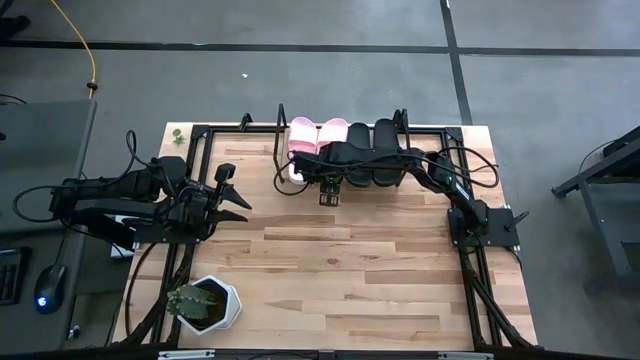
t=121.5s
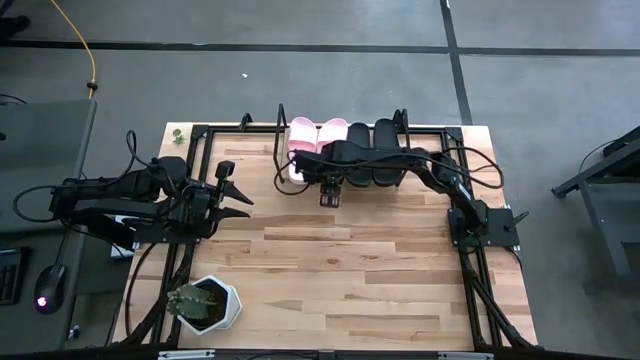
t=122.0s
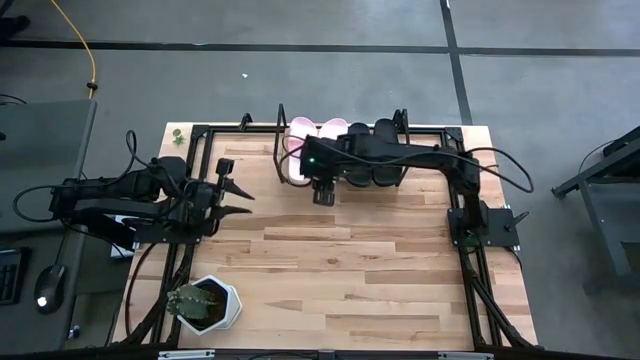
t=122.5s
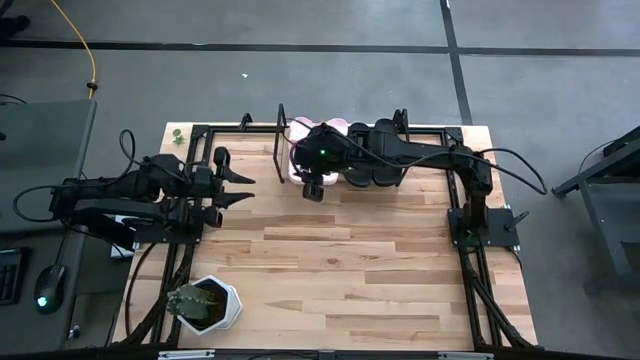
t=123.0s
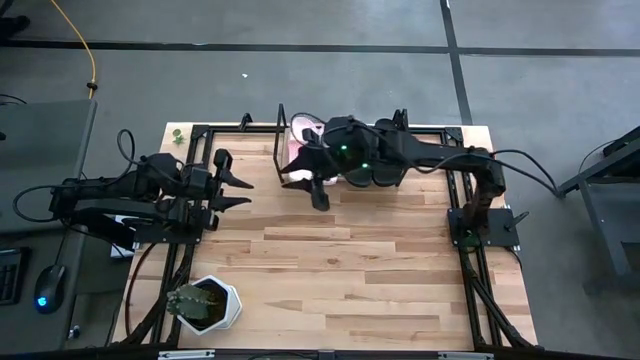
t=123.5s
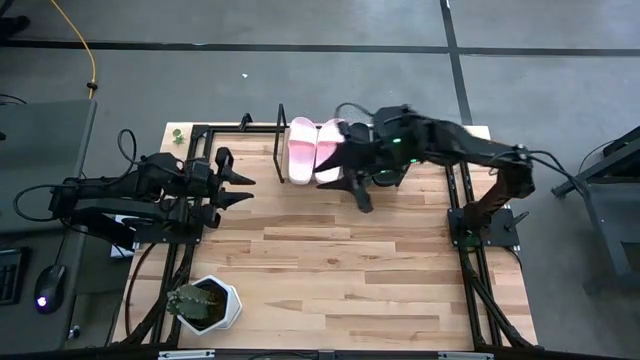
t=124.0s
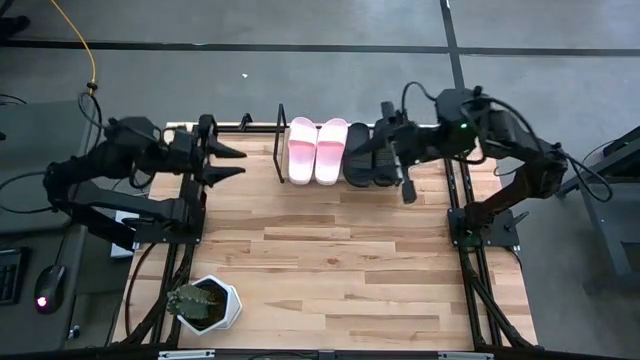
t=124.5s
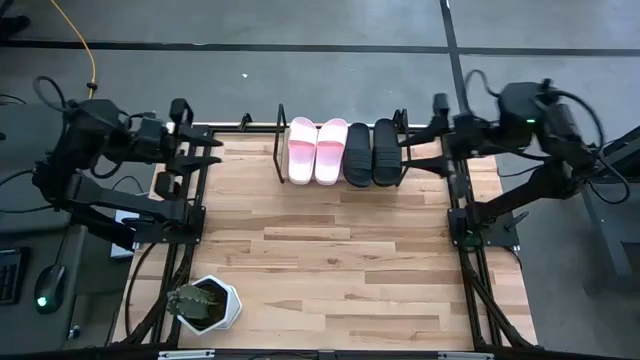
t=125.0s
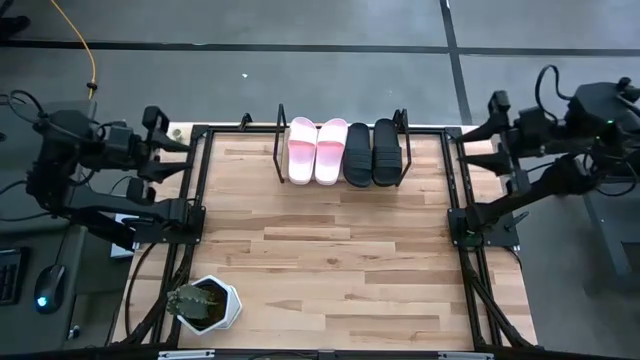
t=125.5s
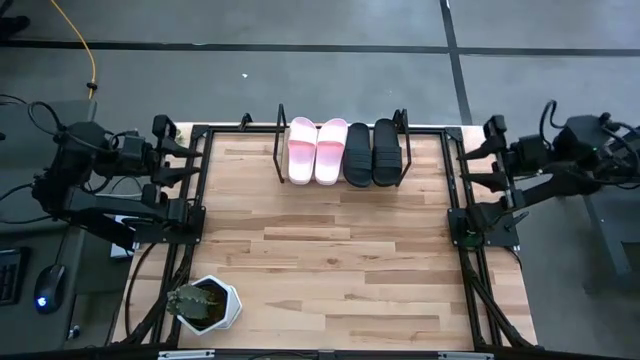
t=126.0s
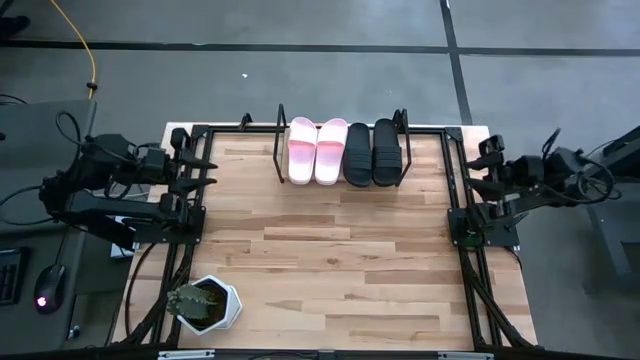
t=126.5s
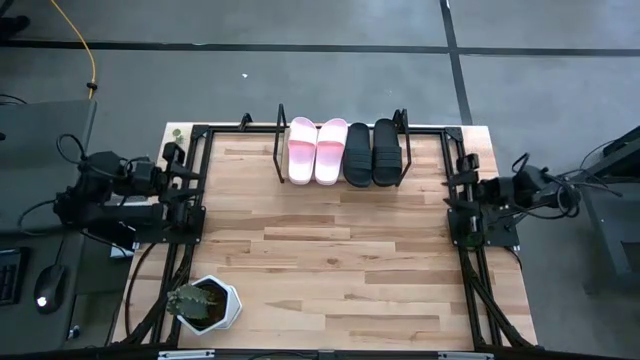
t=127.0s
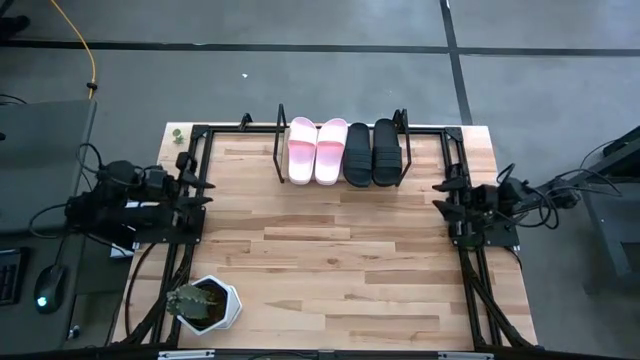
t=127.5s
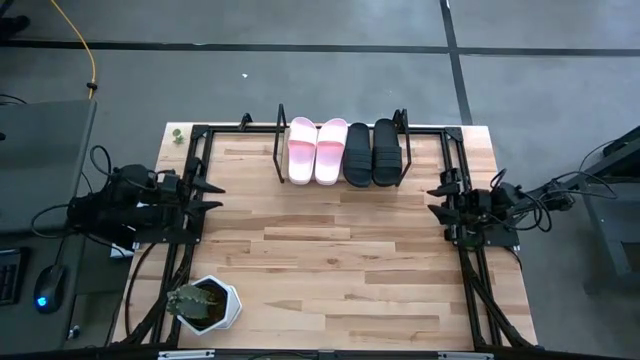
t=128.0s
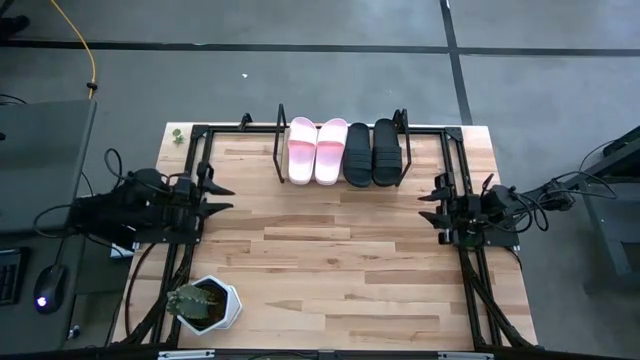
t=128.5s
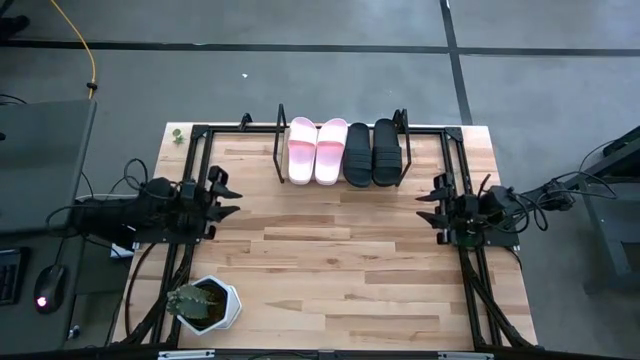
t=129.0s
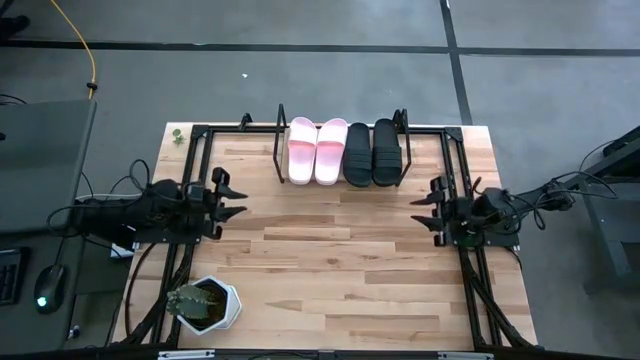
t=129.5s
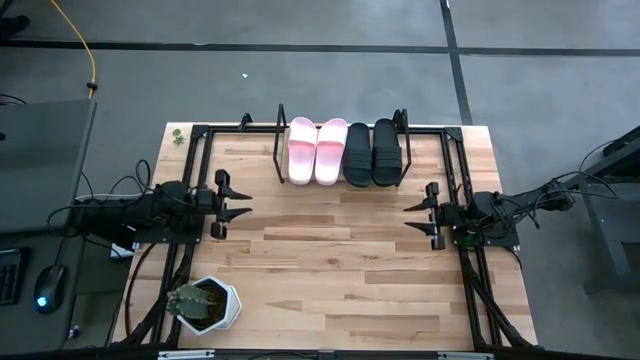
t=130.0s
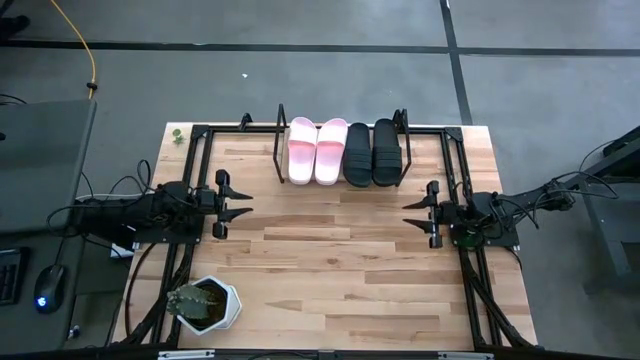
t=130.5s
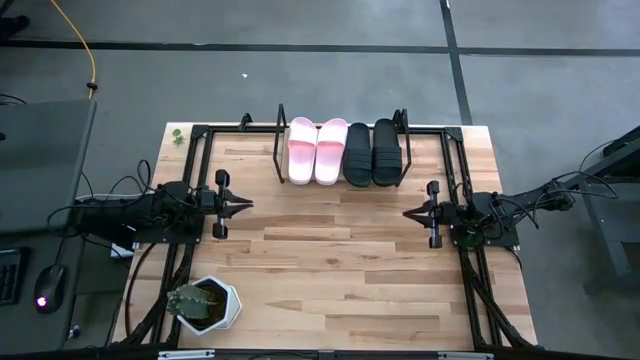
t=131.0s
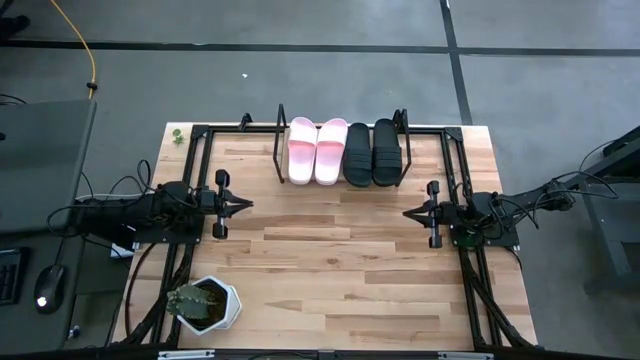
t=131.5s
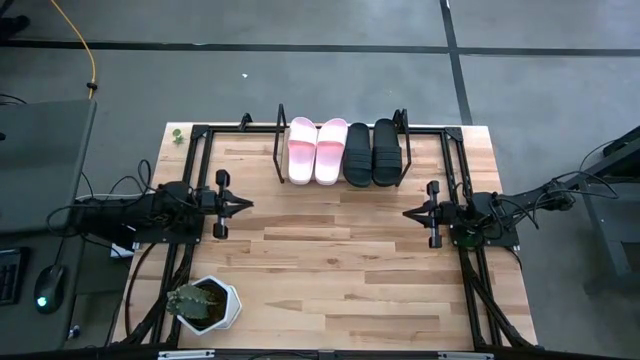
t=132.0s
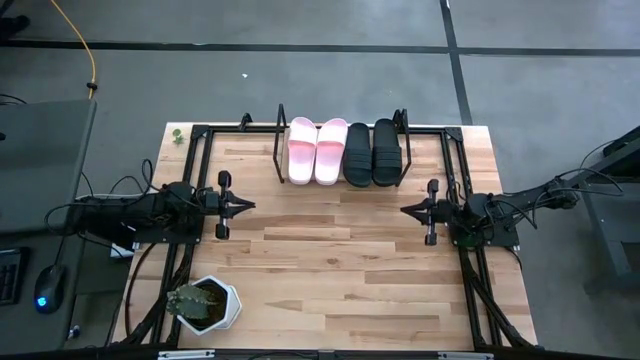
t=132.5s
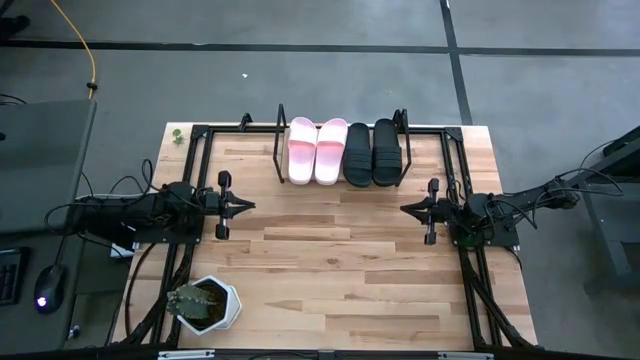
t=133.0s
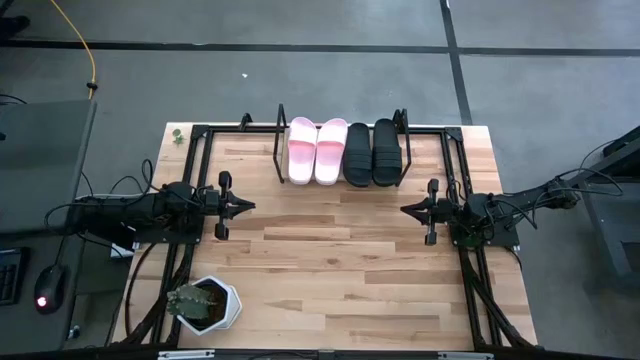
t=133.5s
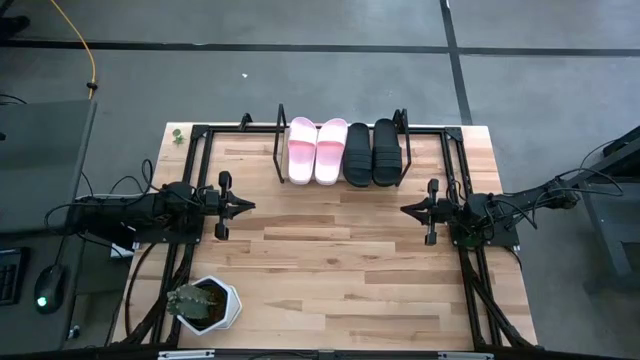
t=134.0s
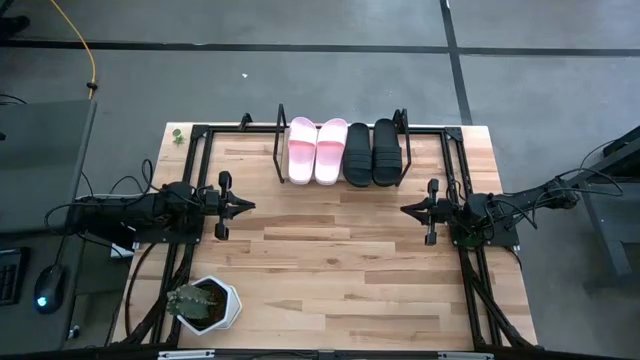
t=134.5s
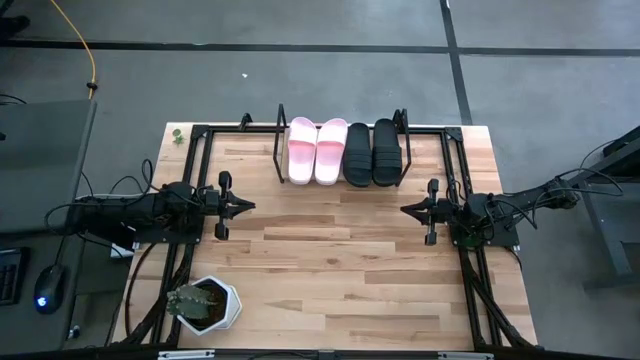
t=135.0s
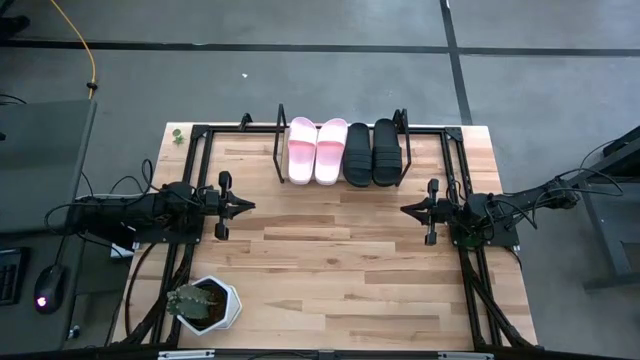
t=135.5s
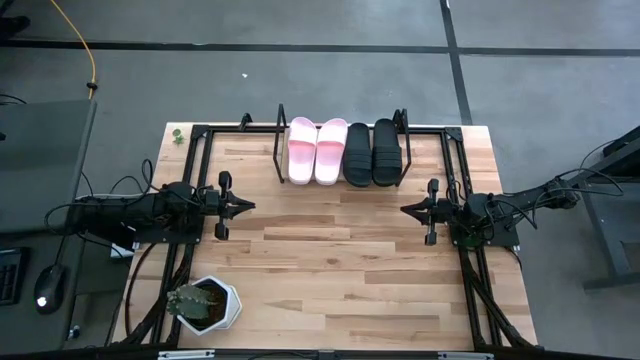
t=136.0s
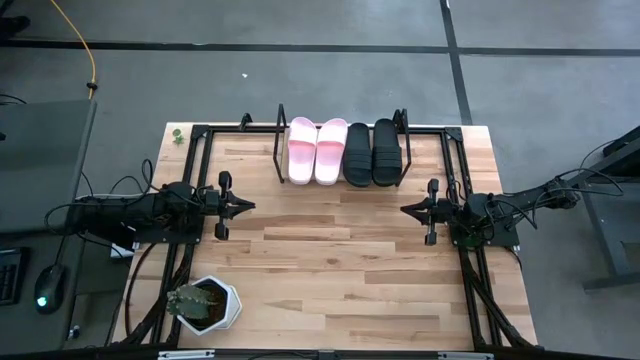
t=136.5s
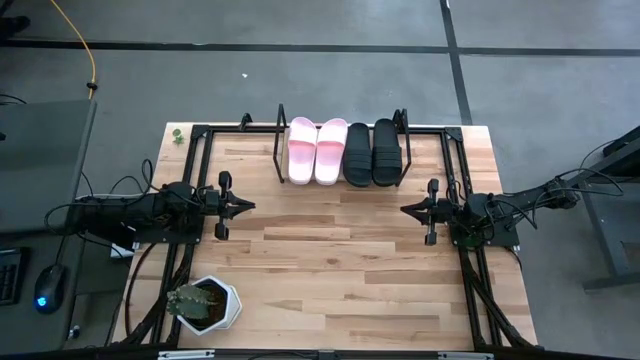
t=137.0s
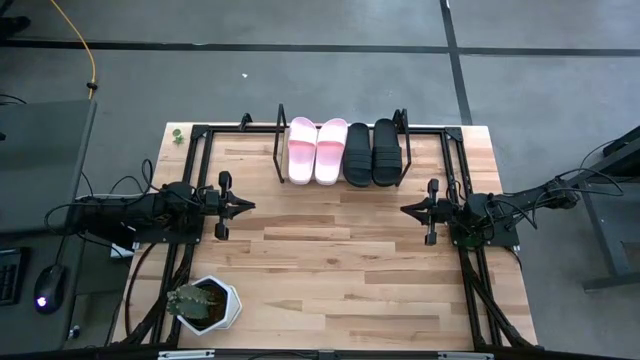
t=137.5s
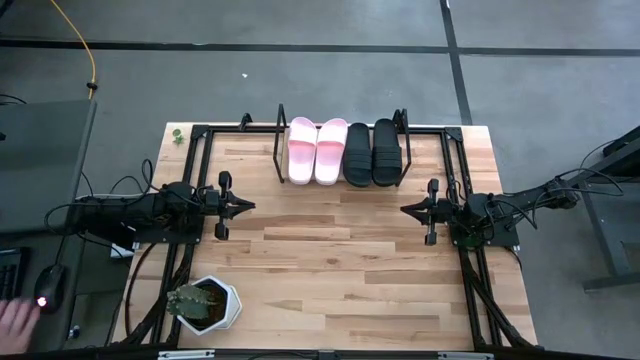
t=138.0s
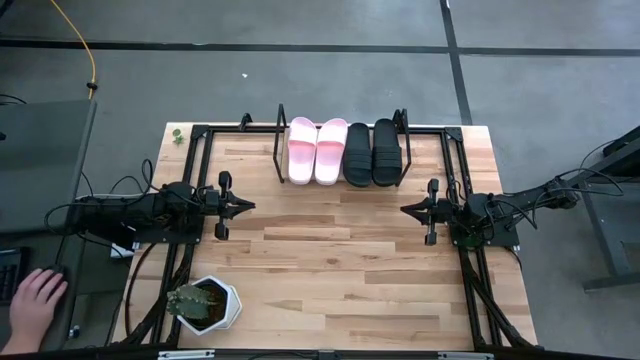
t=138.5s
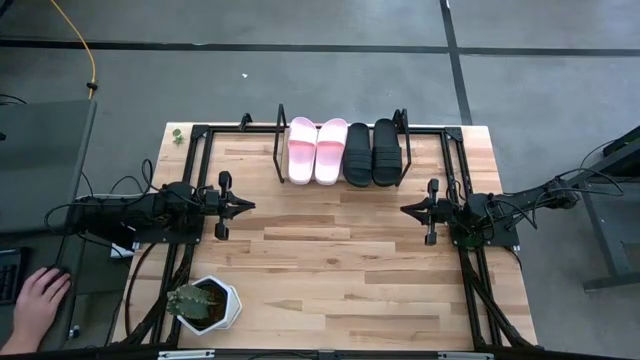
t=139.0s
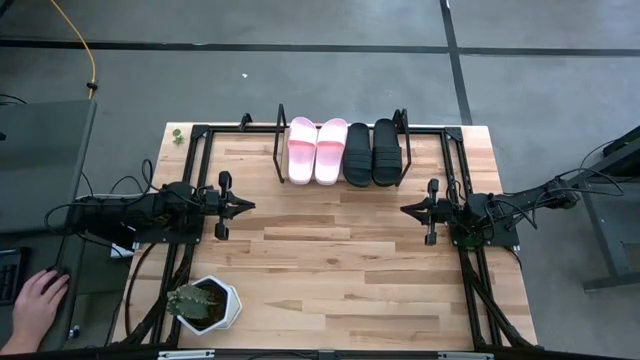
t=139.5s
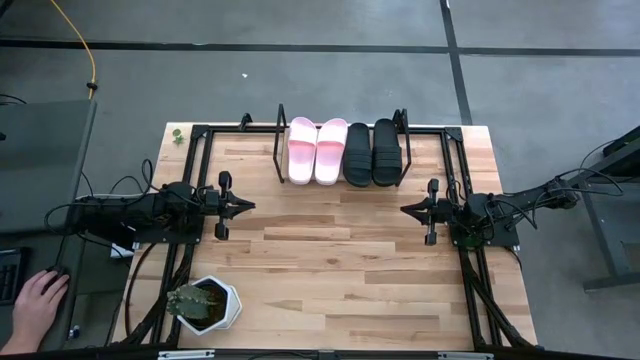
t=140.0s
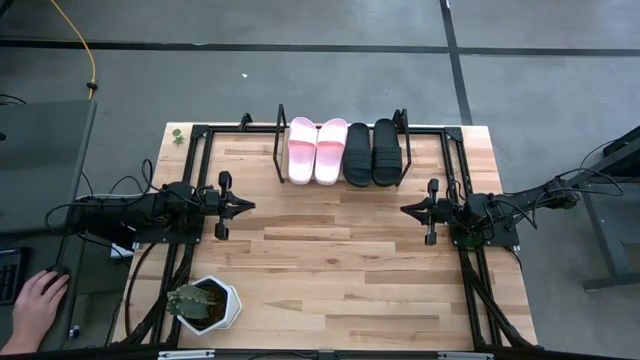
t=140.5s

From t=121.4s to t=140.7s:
Task: Pick and place slides into the shelf
Return to Home Position

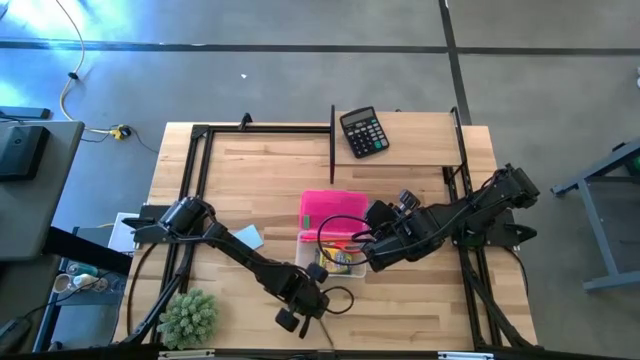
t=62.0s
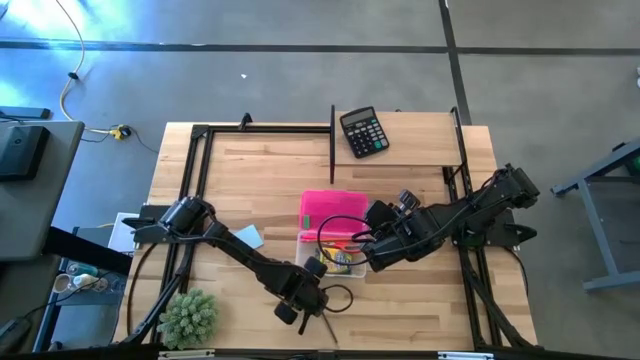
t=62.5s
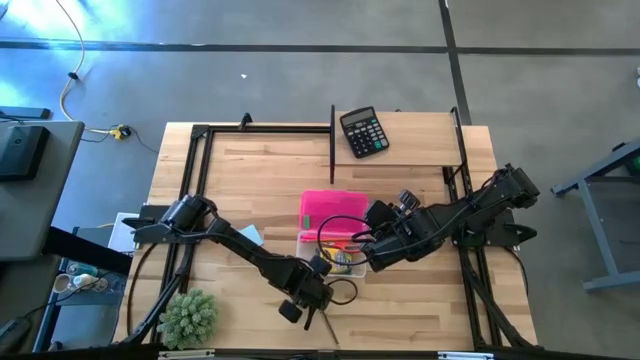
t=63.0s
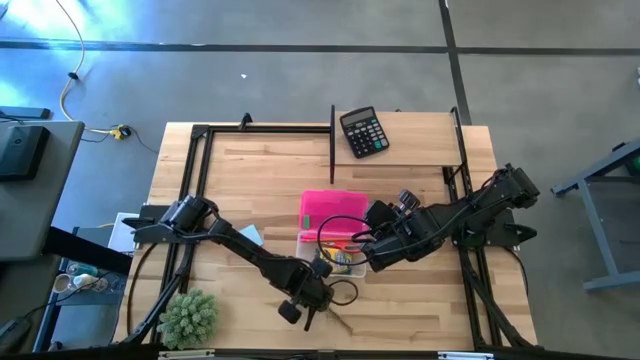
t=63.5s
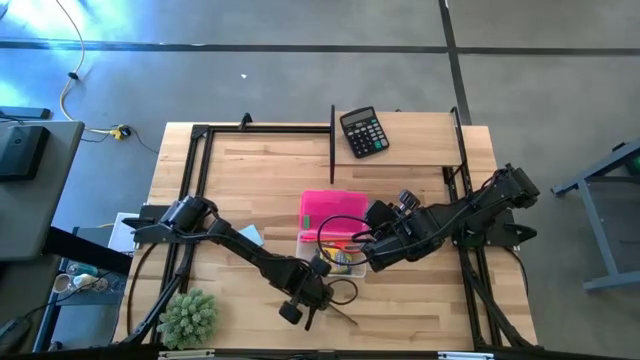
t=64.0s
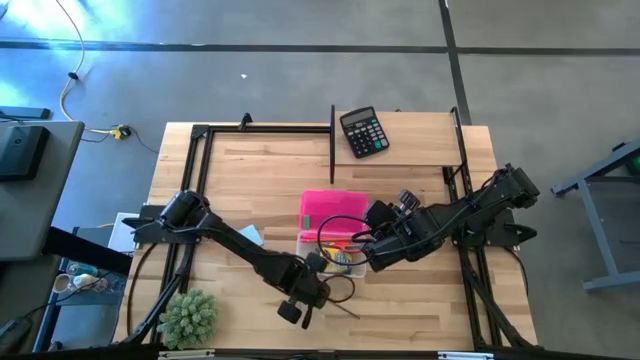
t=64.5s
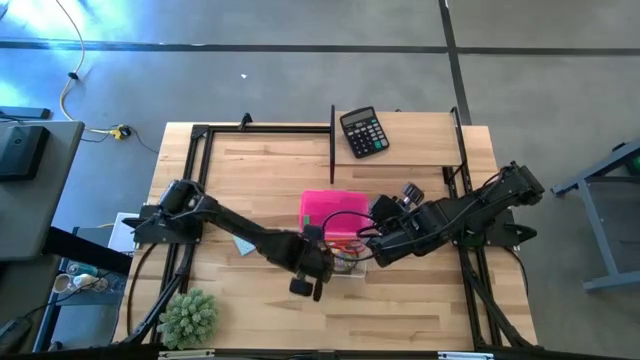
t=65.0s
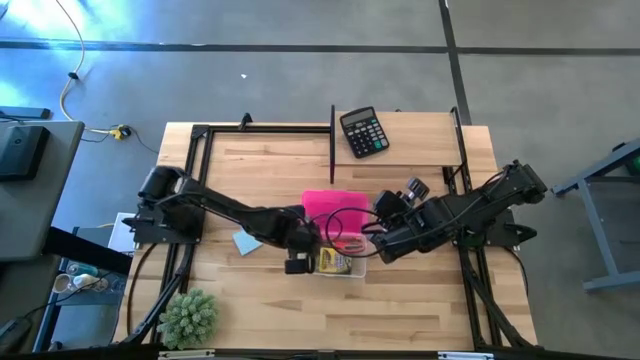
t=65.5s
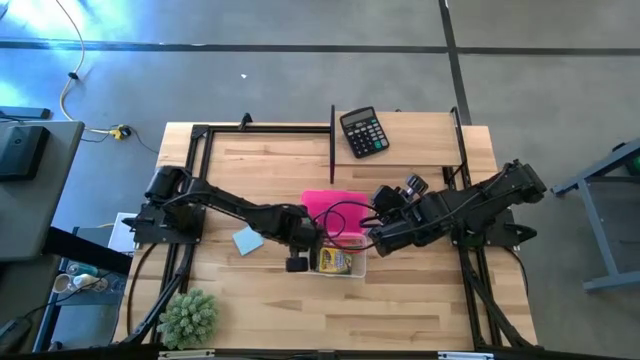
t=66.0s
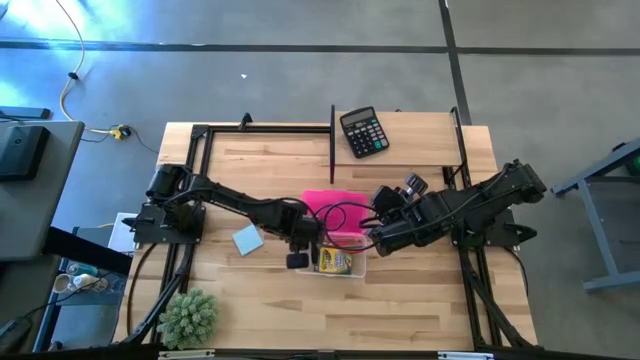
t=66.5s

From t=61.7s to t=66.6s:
Task: Pack school essentials
Put the black pencil into the pink supply box
